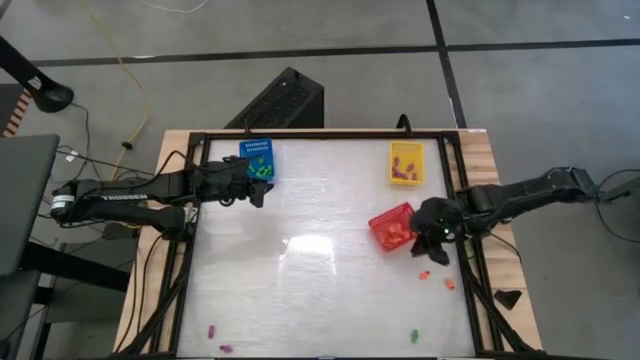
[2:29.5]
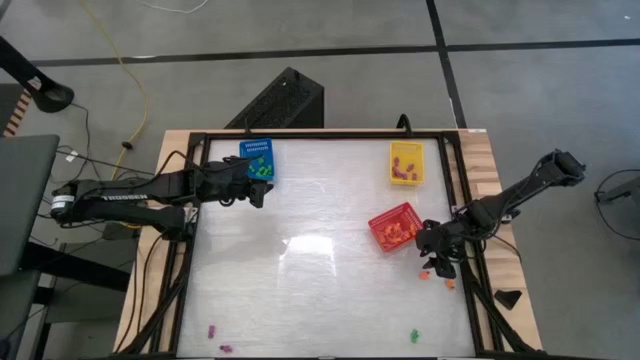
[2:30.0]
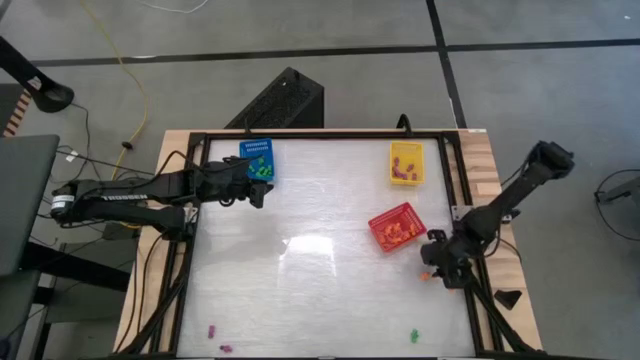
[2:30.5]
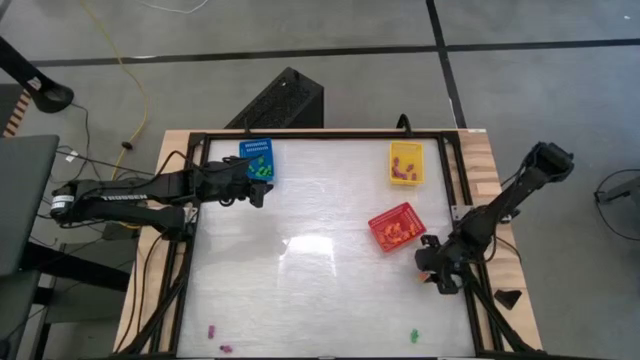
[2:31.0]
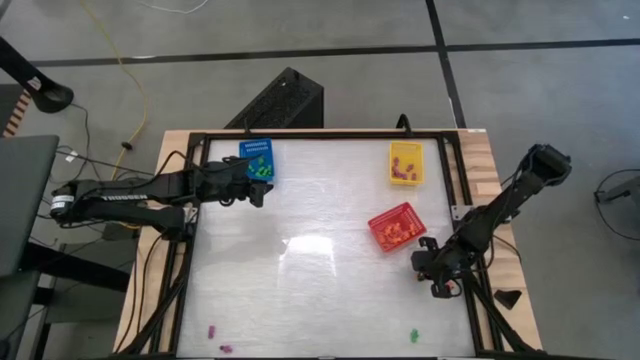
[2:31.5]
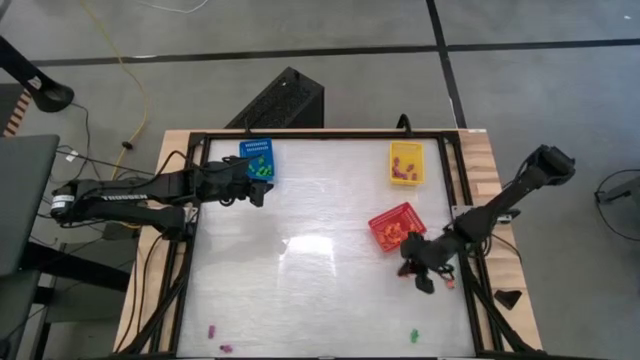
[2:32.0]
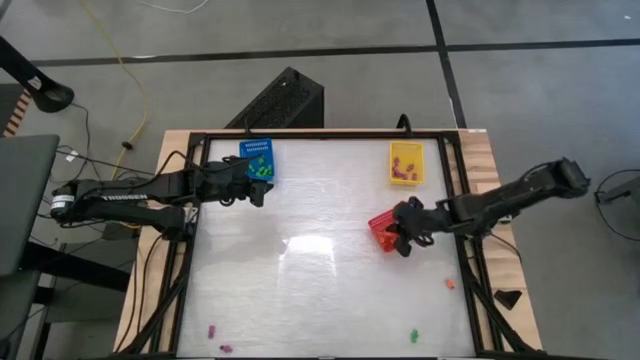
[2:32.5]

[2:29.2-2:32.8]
Task: Sort Halloween decoration
Put the orange skeleton toy into the red bin

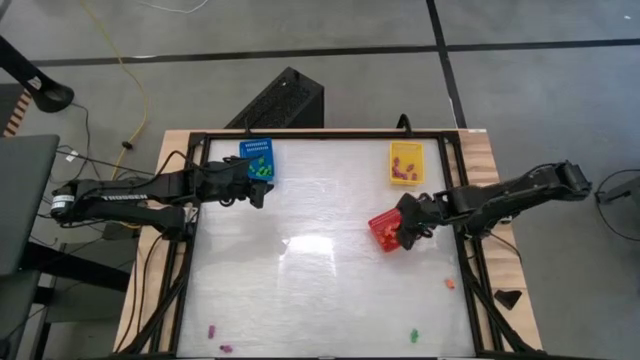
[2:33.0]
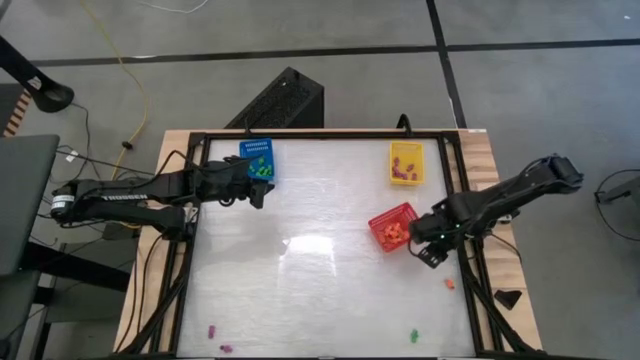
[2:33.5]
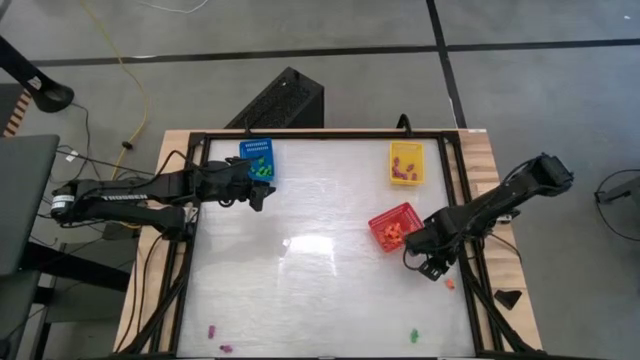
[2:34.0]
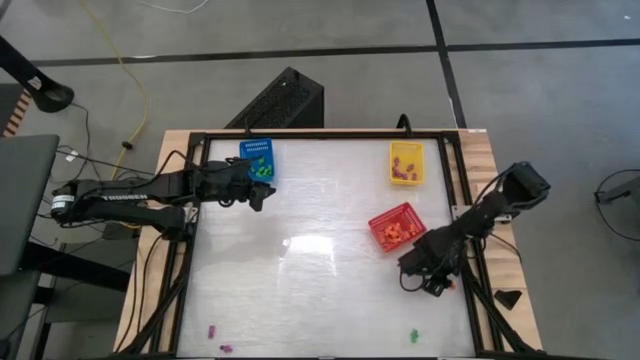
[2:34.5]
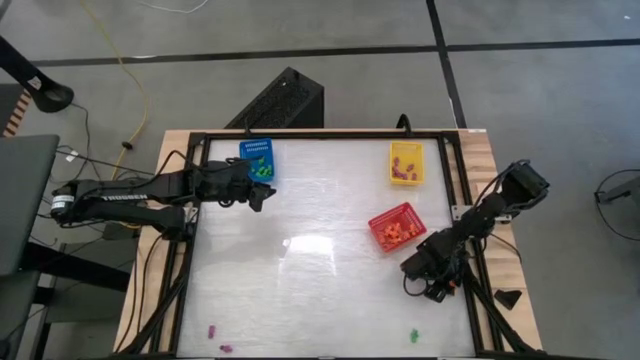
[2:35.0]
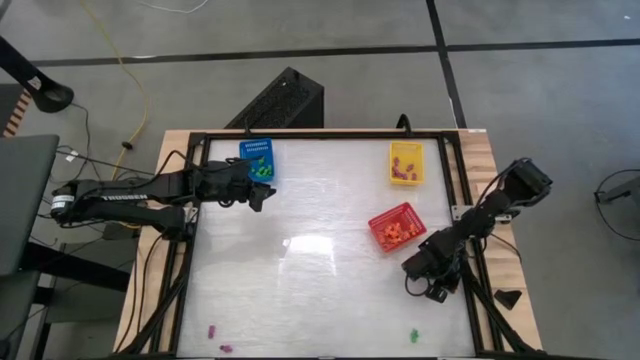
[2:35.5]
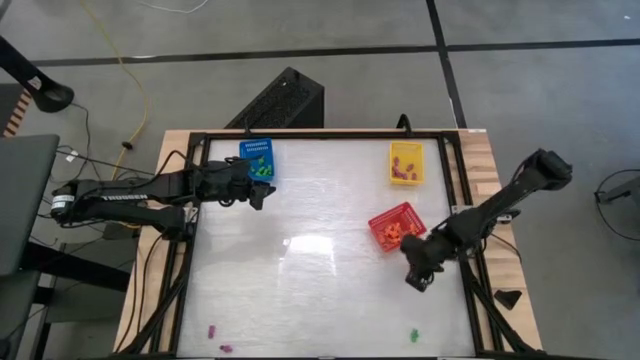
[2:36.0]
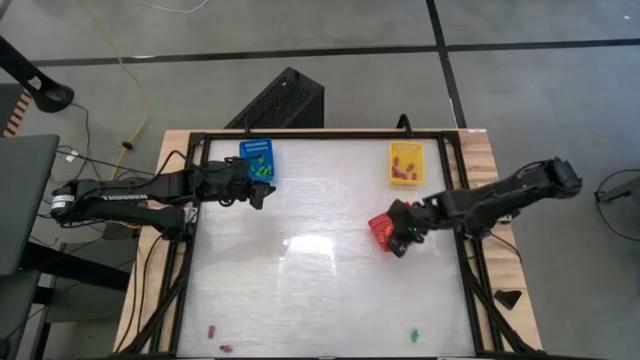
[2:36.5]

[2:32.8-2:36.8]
Put the orange skeleton toy into the red bin

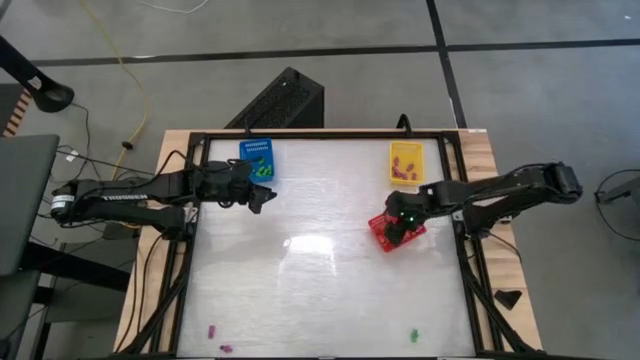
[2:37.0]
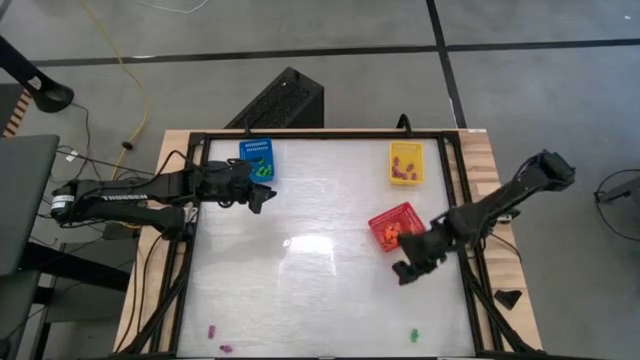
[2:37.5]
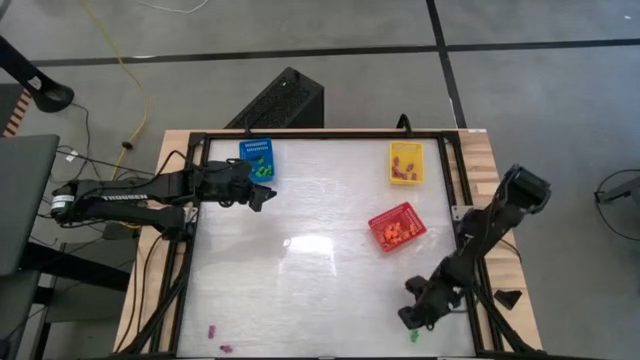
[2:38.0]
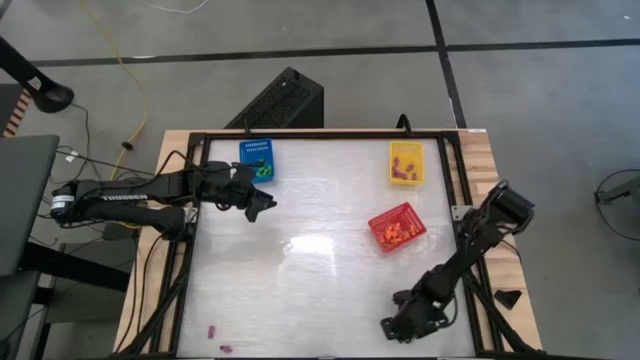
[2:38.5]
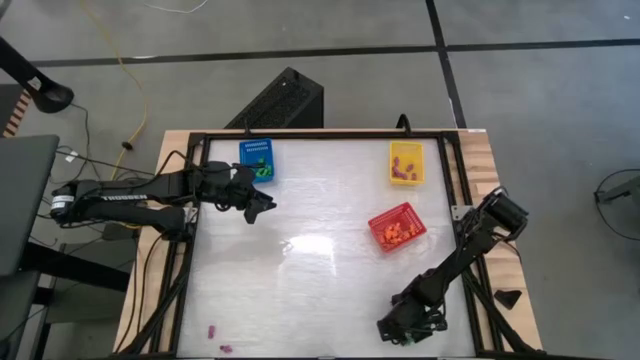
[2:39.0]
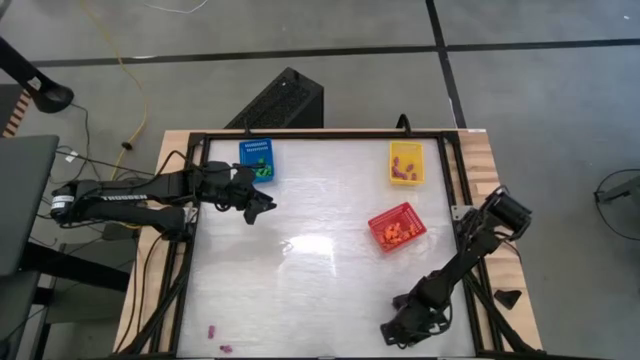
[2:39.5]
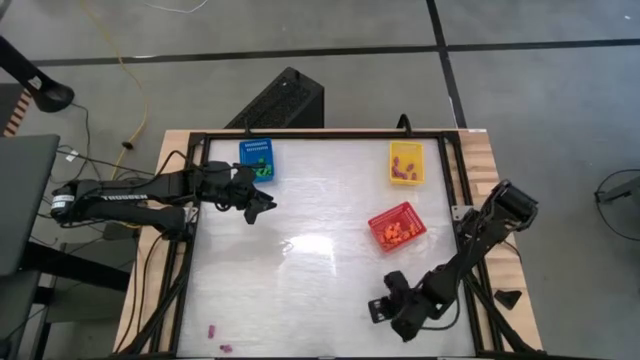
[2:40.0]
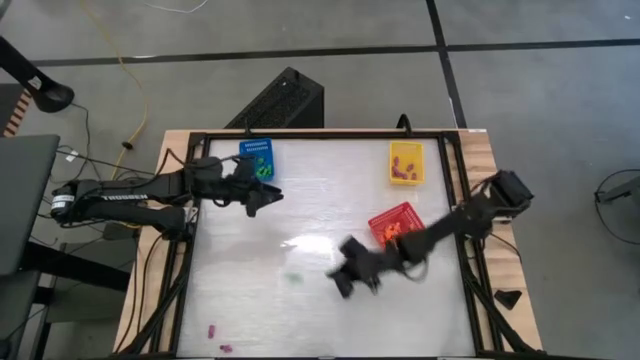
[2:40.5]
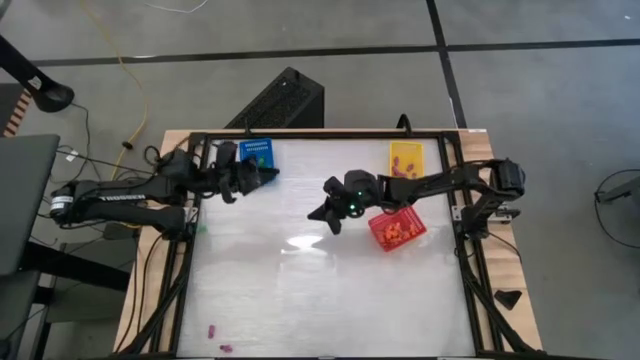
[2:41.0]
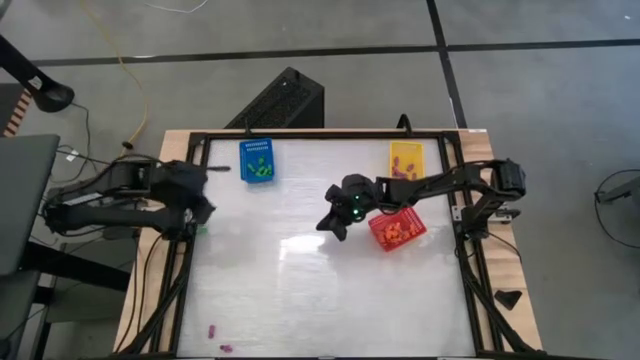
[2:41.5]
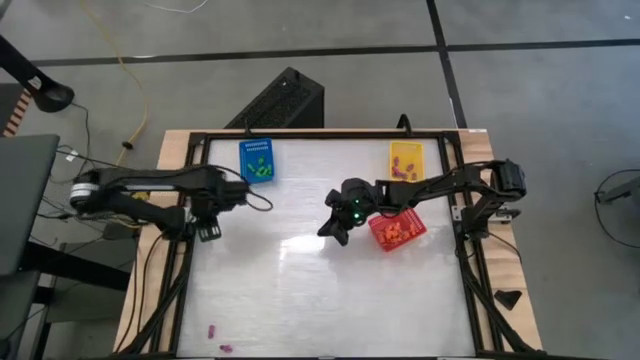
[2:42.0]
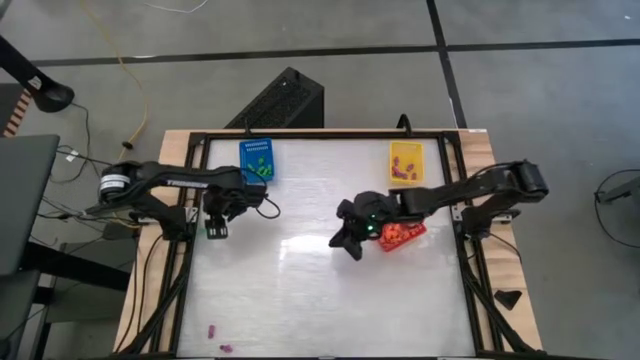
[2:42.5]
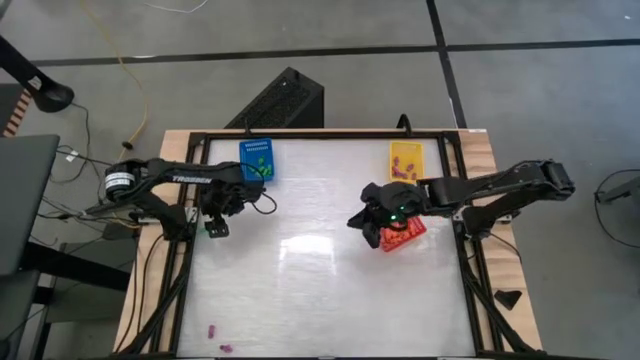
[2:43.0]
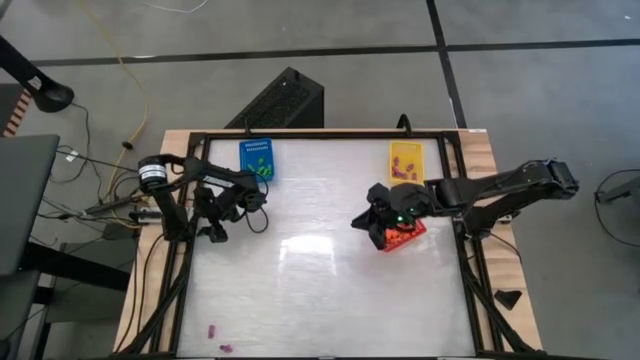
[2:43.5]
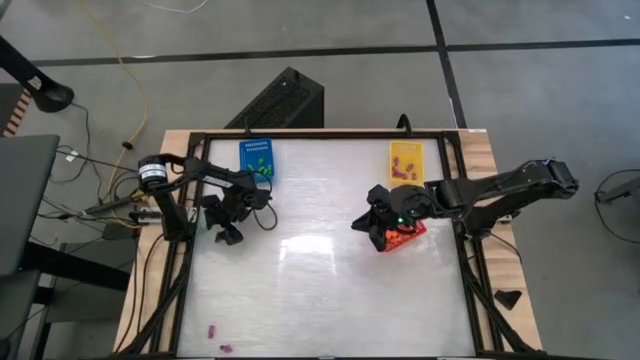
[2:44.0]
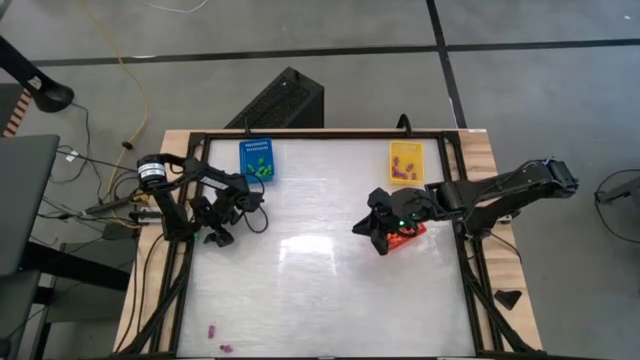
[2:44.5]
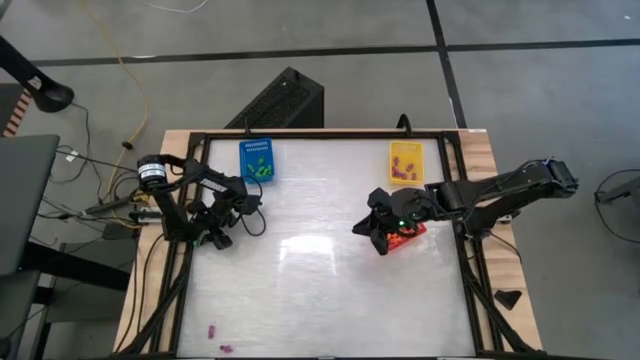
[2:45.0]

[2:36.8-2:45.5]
Put the green skeleton toy into the blue bin

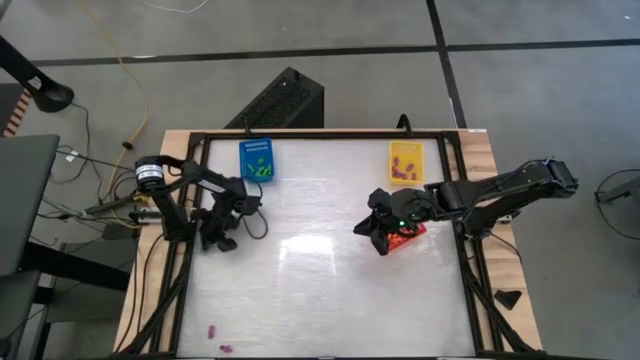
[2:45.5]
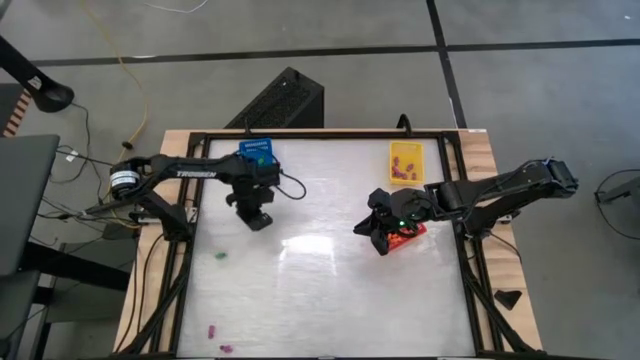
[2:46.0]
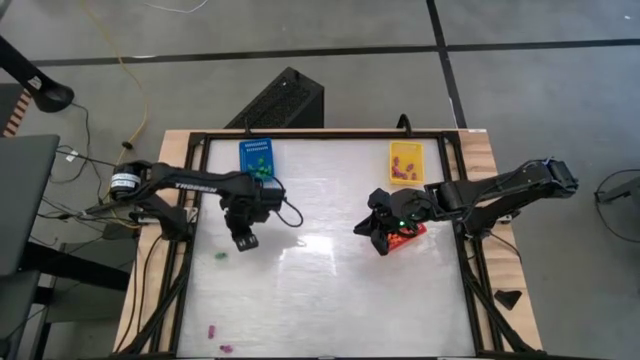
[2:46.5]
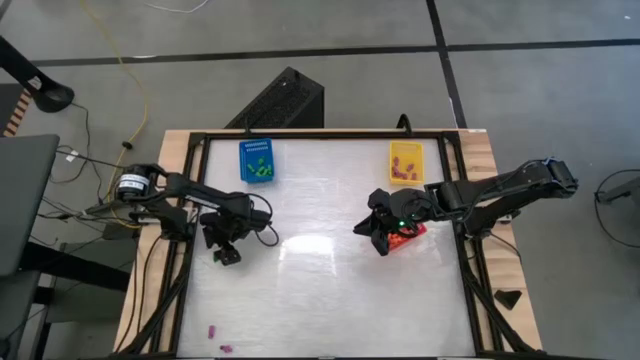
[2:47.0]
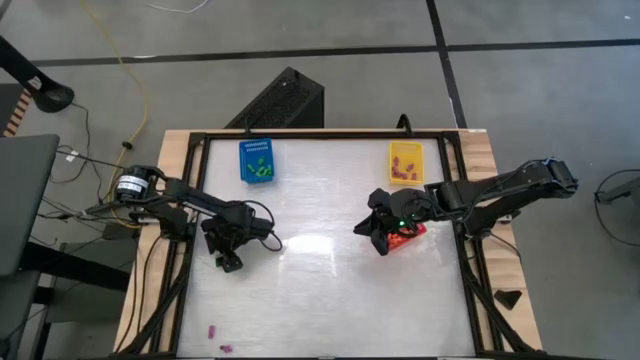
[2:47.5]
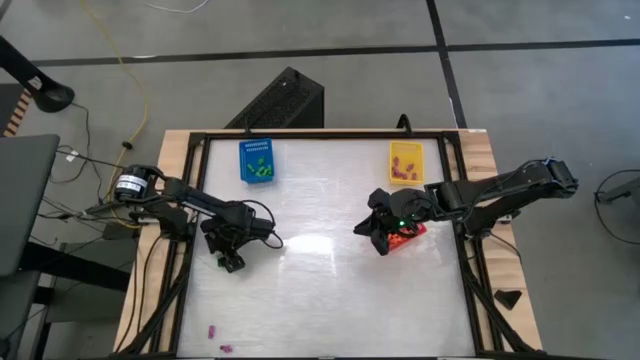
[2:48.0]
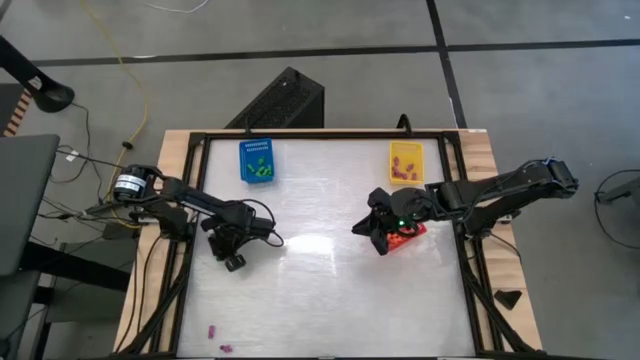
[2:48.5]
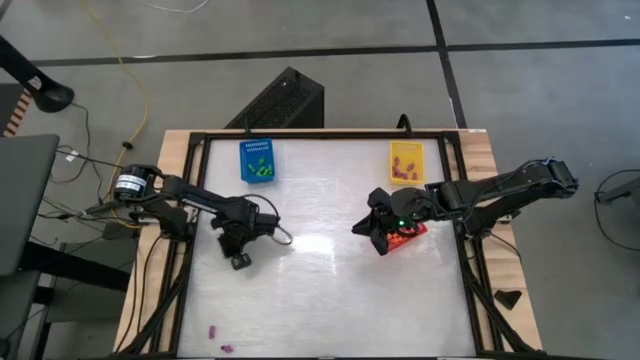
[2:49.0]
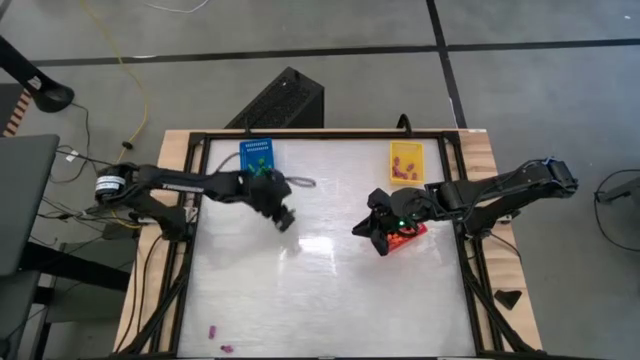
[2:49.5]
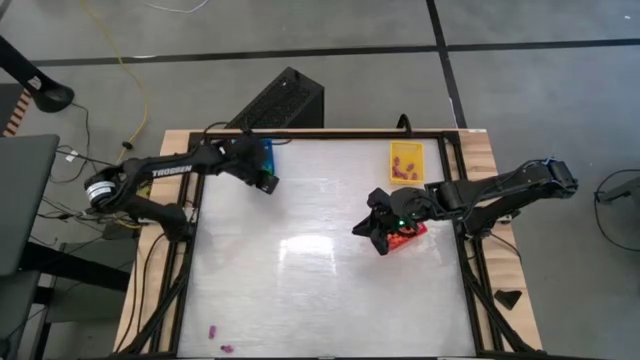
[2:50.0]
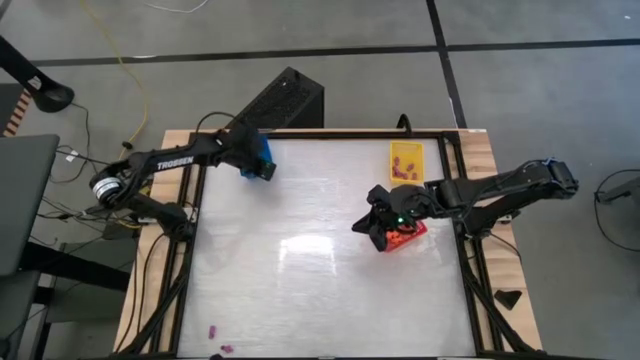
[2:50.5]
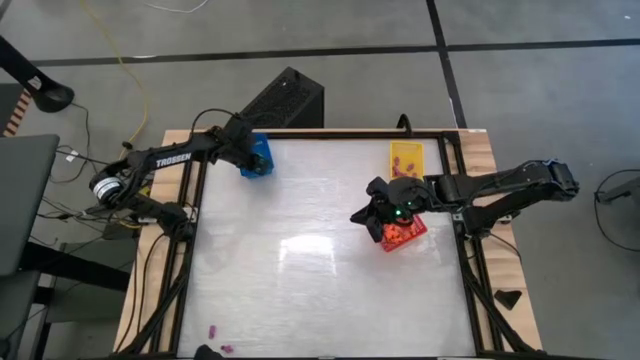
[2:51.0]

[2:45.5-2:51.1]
Put the green skeleton toy into the blue bin
